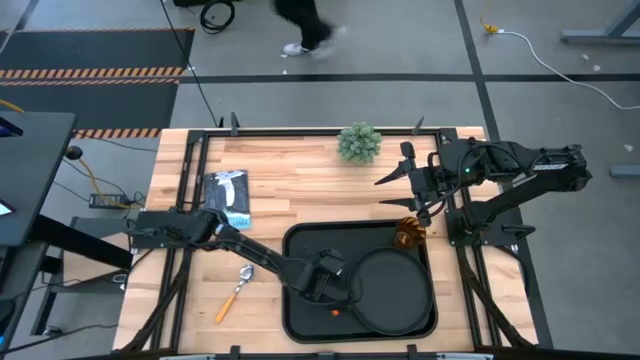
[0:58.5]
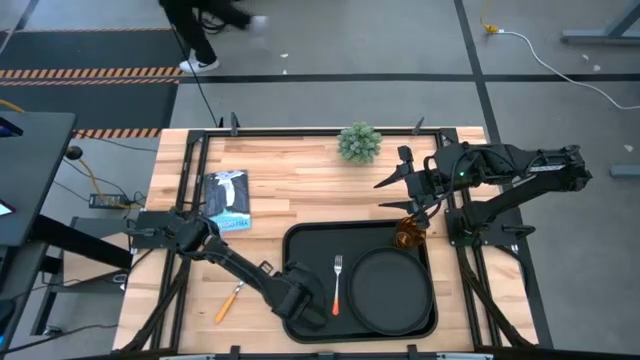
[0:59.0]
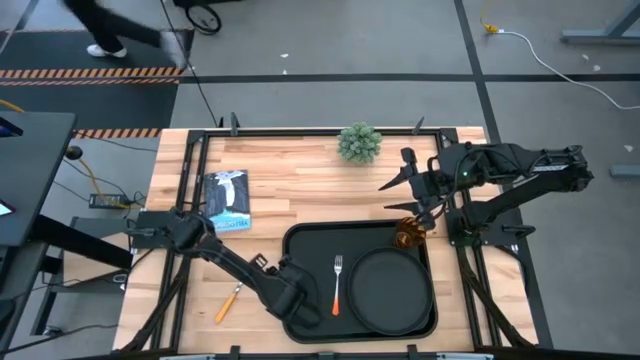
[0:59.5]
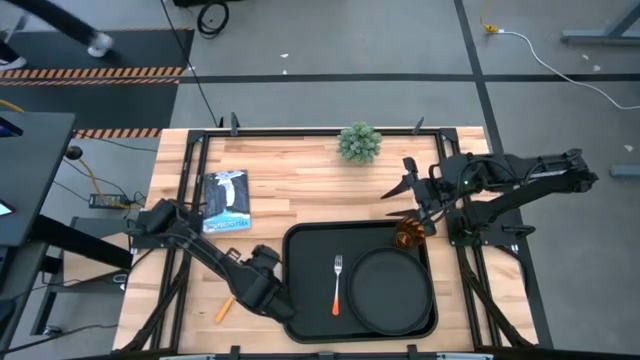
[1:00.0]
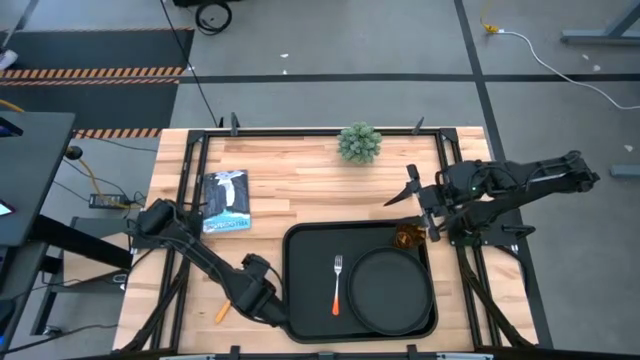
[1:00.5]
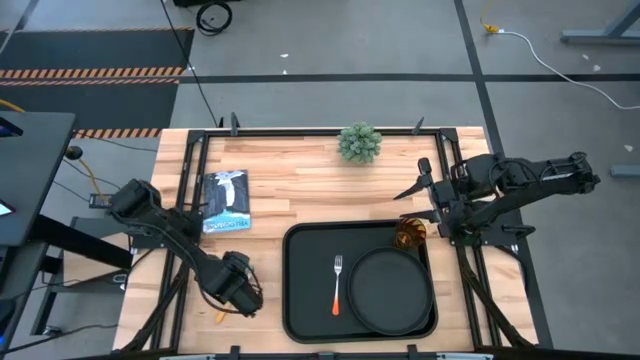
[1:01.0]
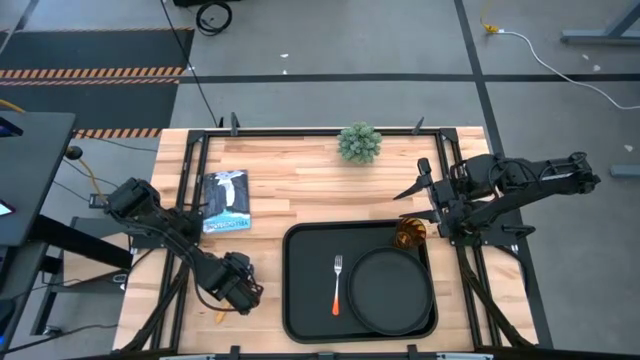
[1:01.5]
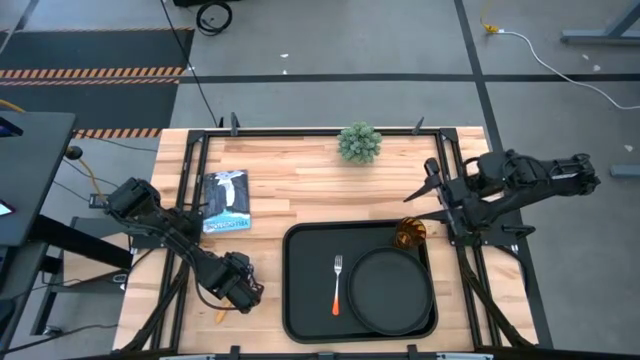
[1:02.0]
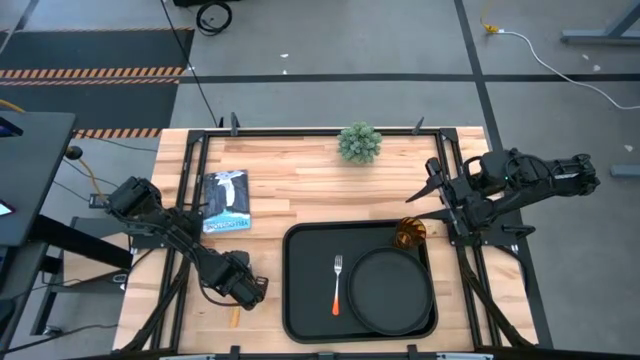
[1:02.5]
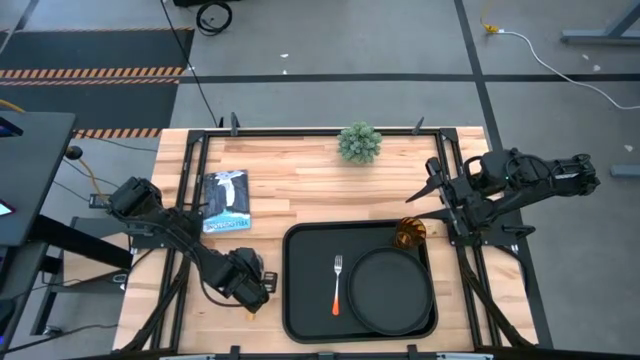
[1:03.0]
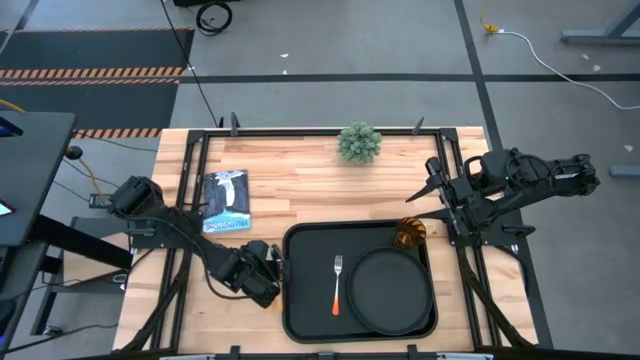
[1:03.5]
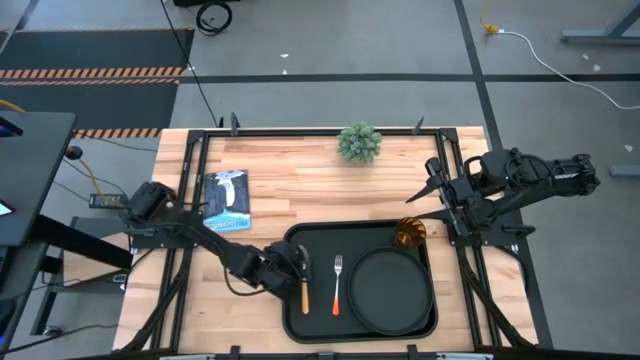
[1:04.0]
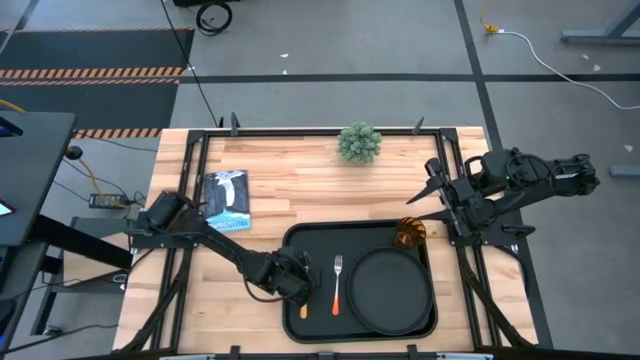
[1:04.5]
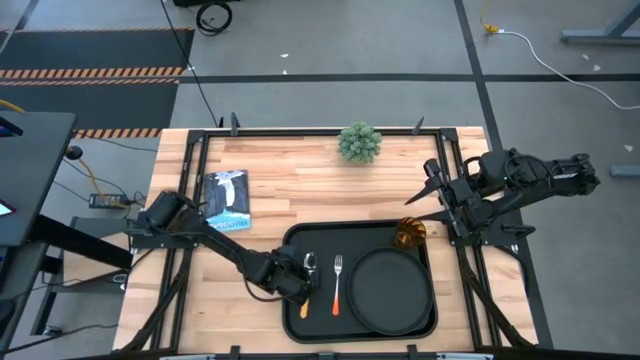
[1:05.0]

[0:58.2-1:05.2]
Task: Pick and place plate/cup/fork/spoon on tray
Put the yellow spoon on the black tray to the left of the orange fork

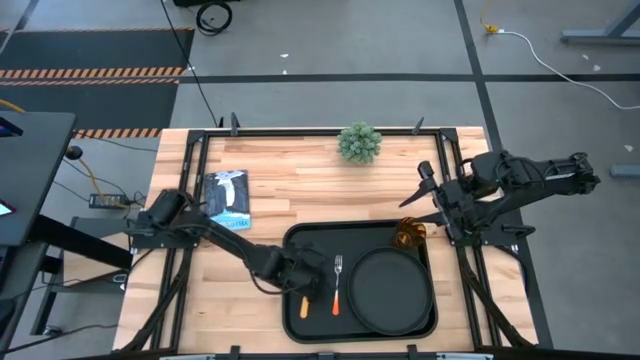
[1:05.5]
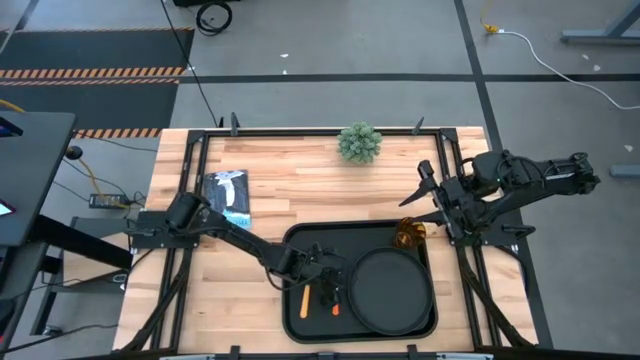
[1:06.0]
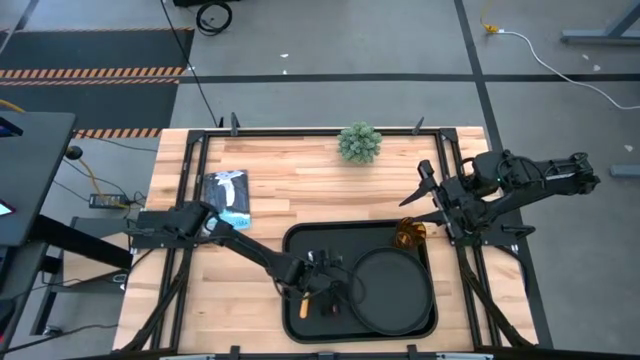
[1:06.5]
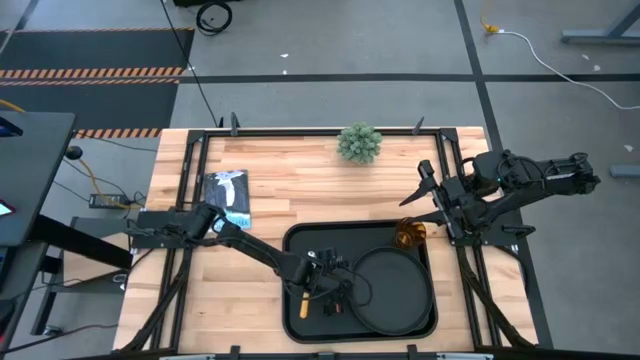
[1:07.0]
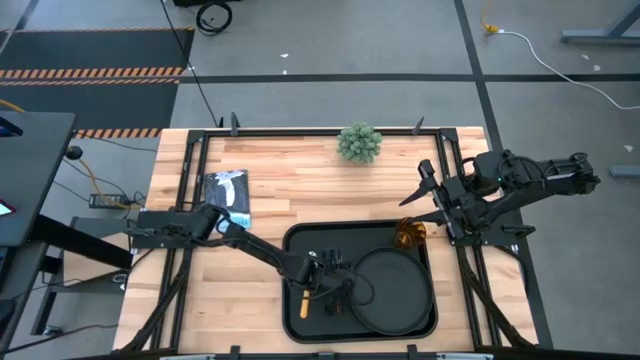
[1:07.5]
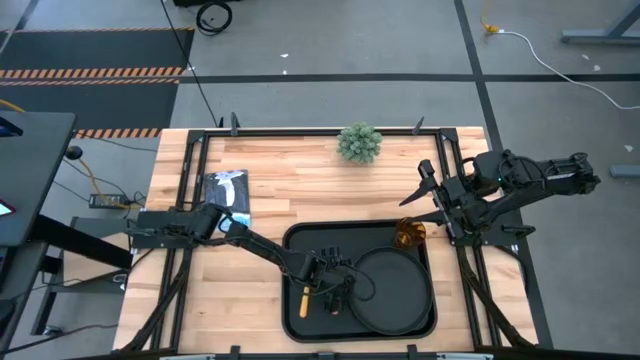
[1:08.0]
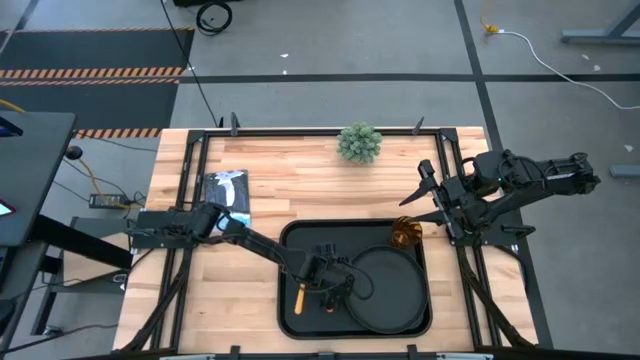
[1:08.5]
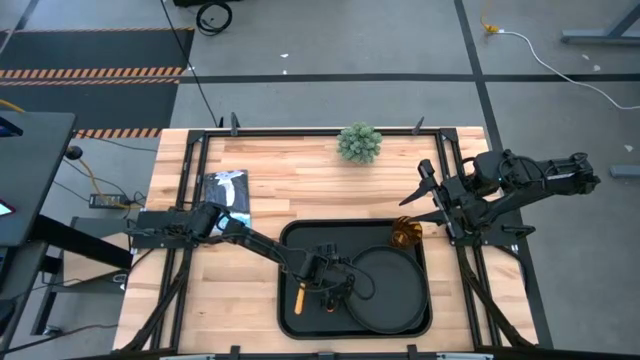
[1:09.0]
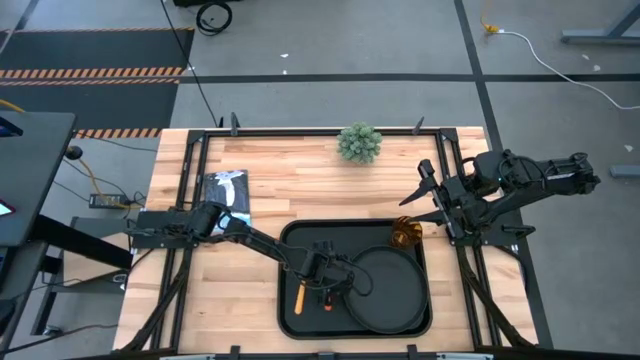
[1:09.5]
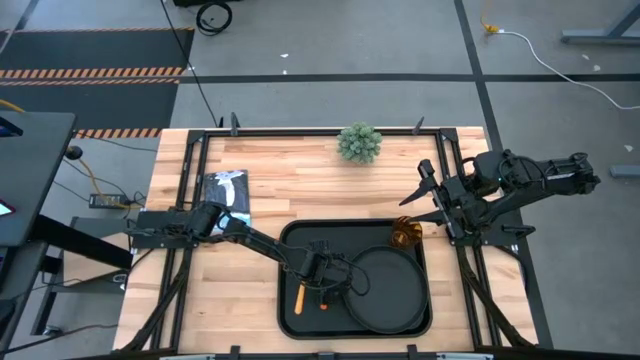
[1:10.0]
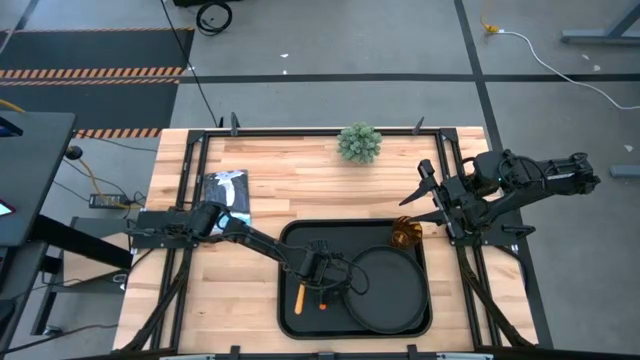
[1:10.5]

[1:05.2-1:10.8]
Adjust the orange fork on the black tray

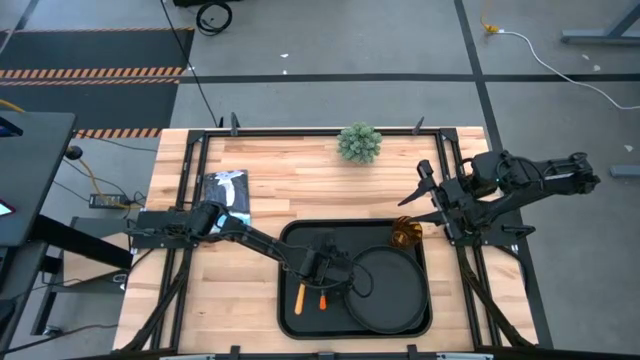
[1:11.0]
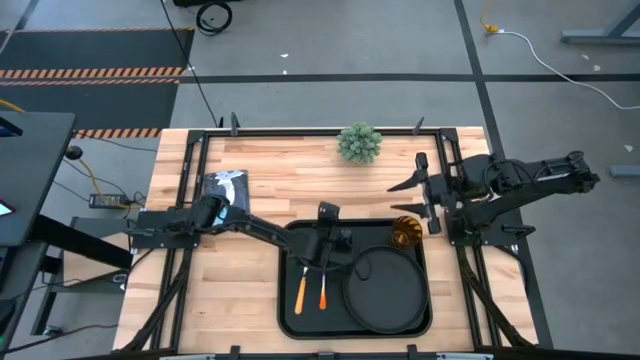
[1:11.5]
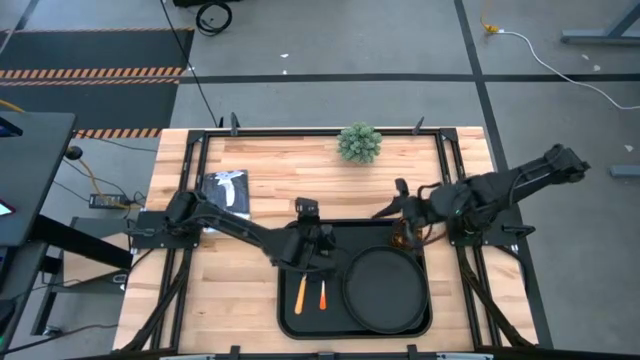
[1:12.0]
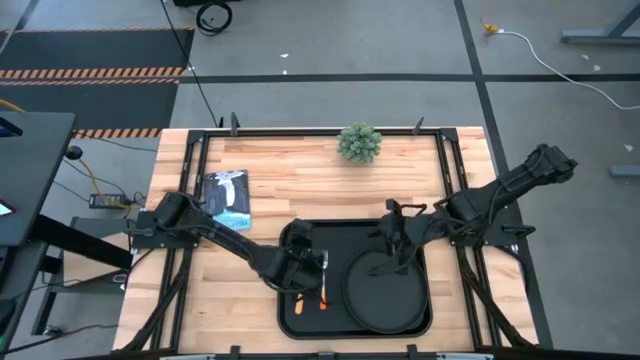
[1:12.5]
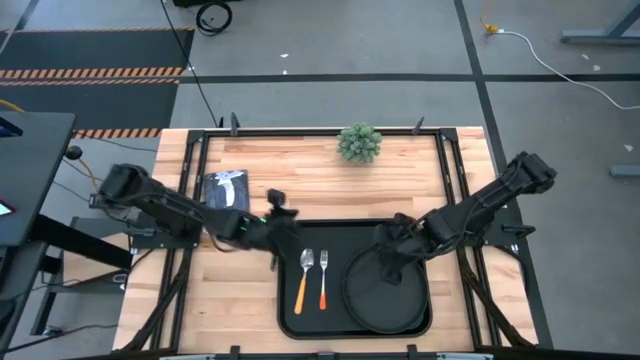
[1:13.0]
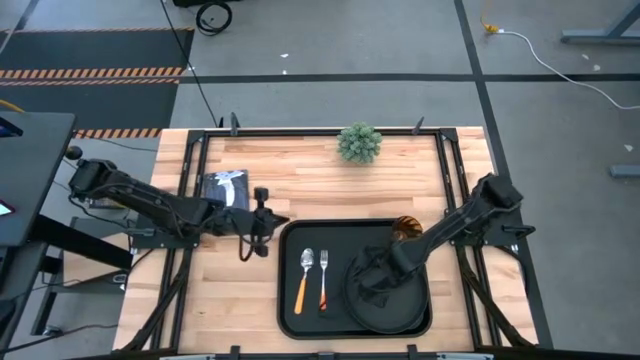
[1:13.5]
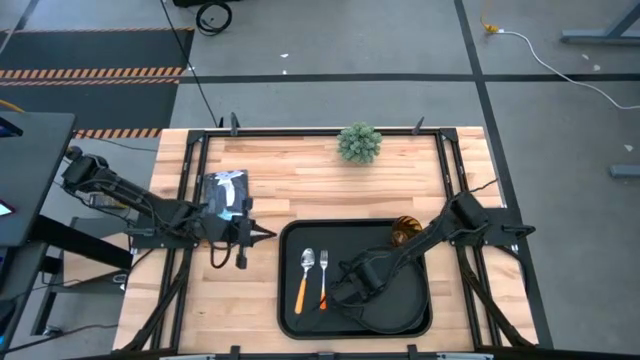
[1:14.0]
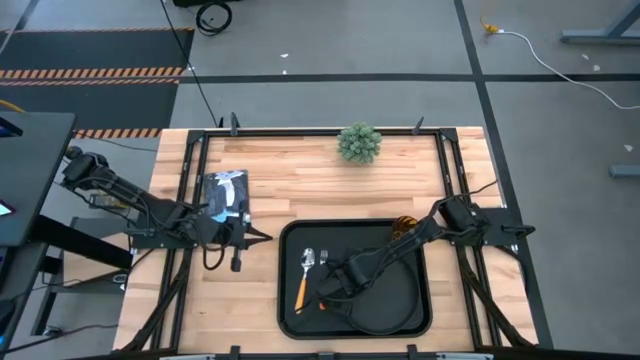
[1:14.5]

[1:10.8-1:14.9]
Adjust the black plate on the black tray

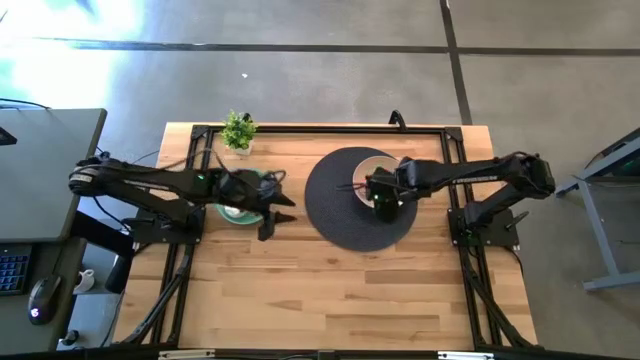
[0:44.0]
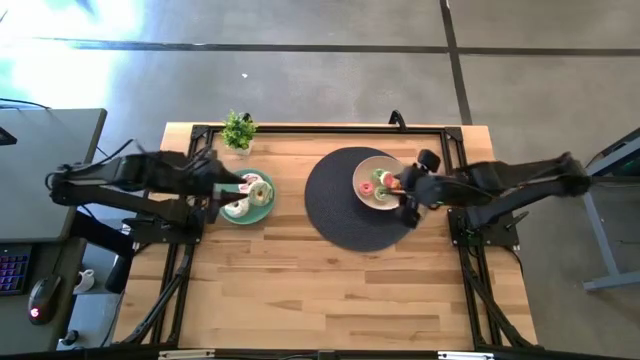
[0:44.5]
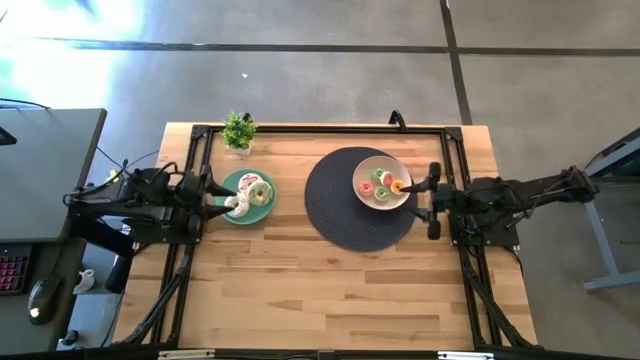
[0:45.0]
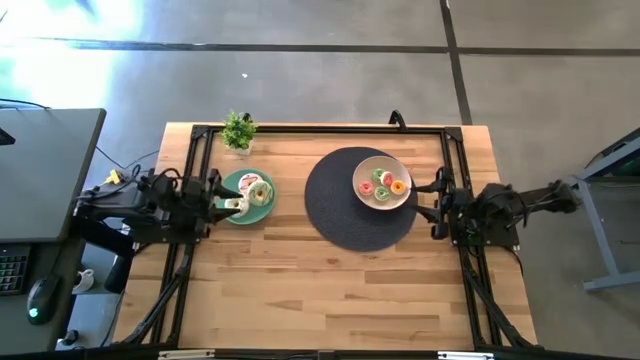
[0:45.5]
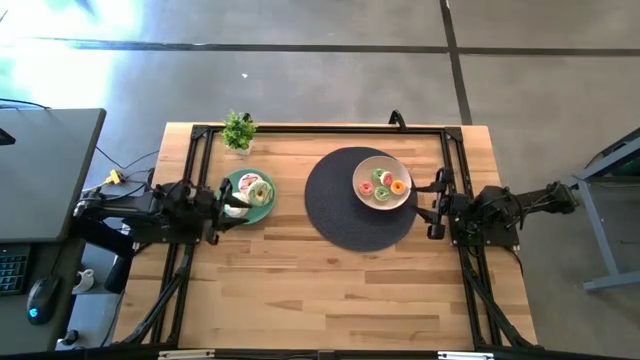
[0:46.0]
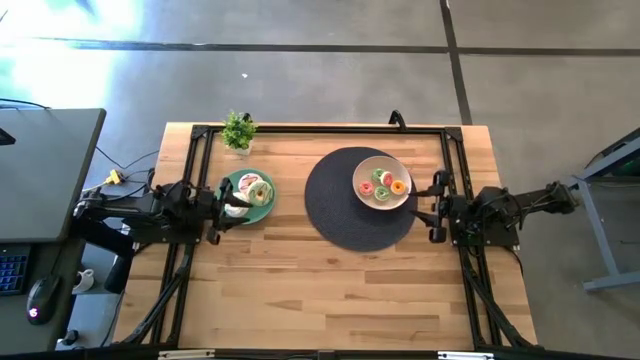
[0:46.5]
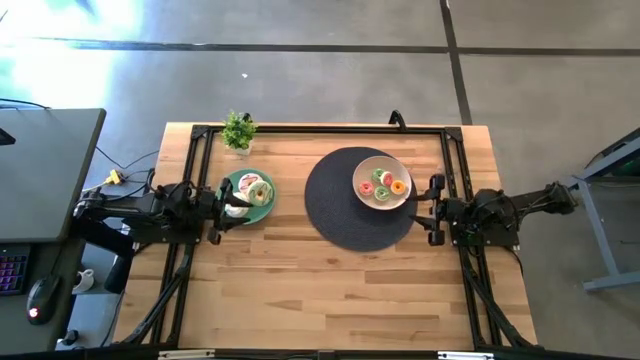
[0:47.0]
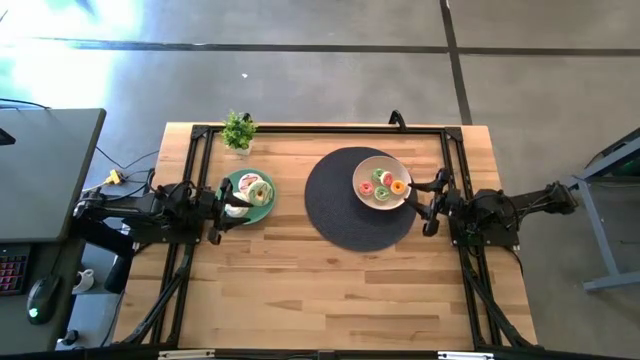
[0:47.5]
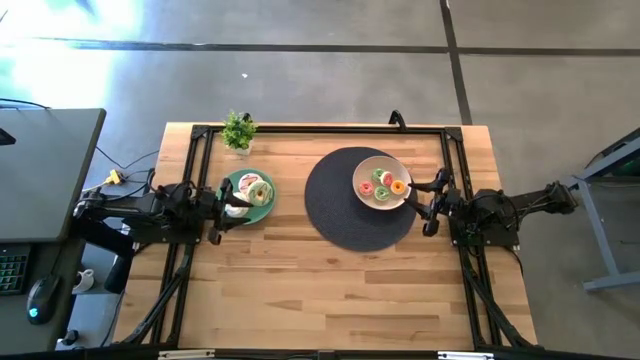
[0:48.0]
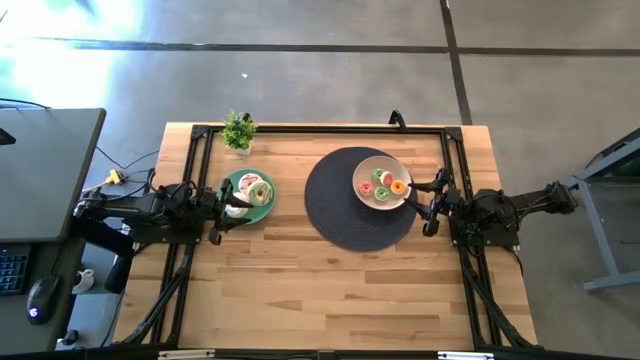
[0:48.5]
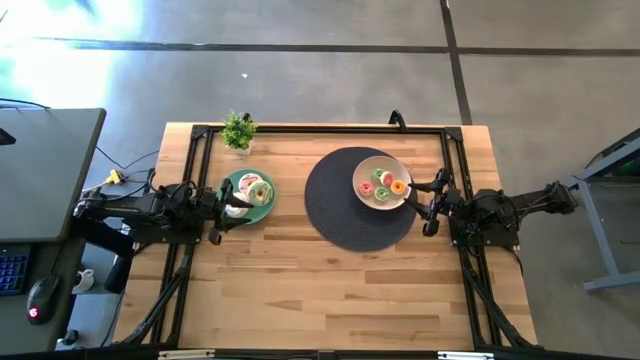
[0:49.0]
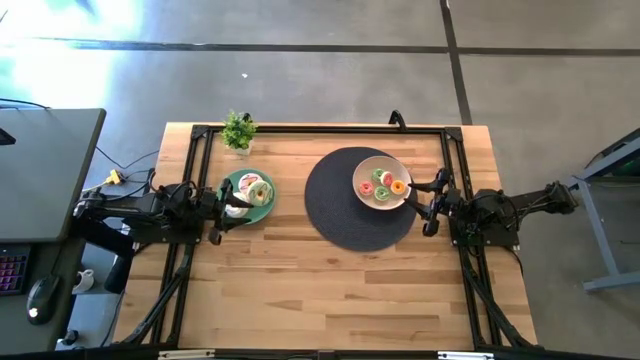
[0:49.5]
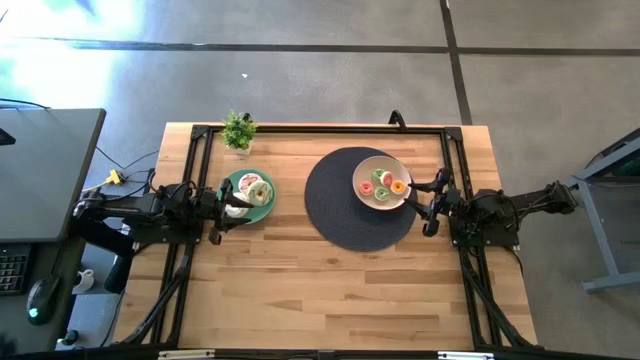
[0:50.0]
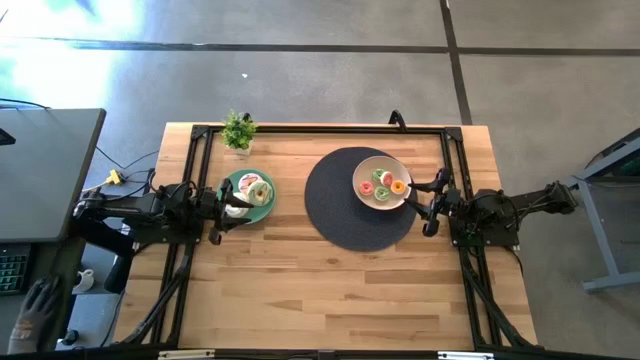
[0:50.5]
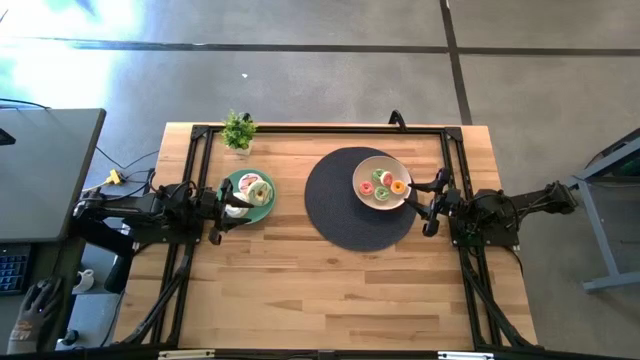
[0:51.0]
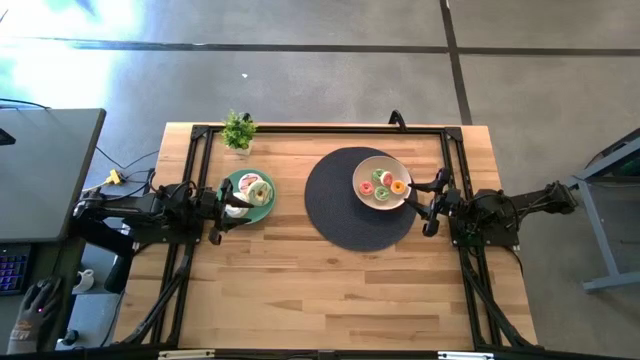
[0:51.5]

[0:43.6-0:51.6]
Task: Pick & Place donuts
Return to Home Position
